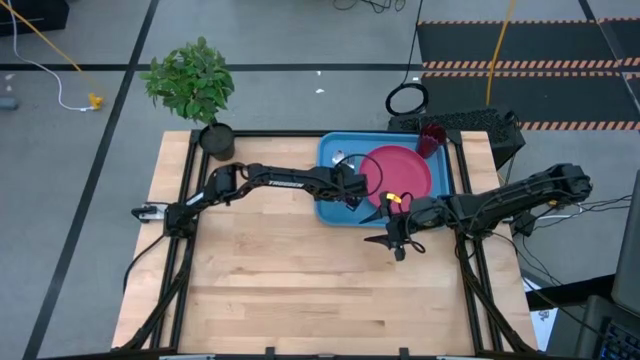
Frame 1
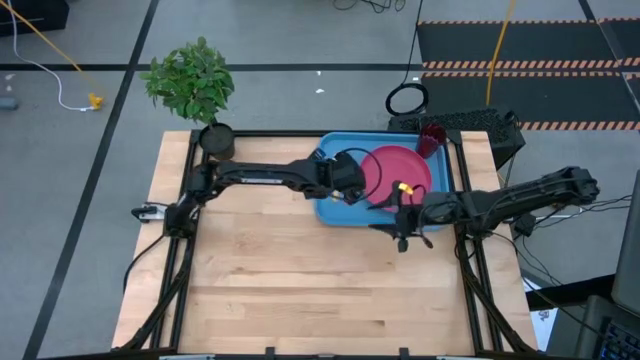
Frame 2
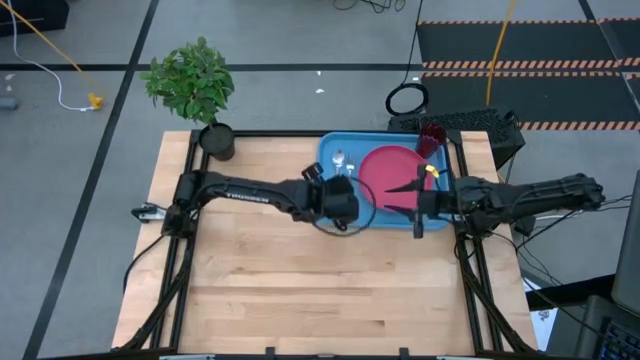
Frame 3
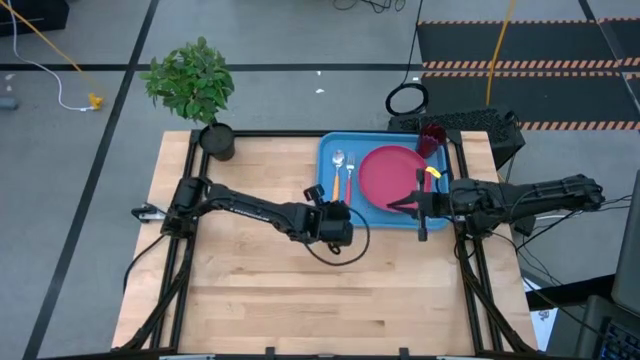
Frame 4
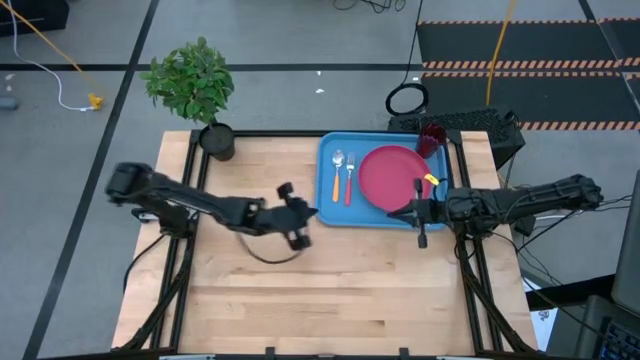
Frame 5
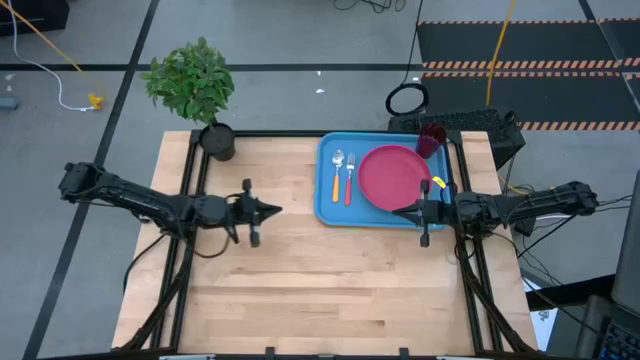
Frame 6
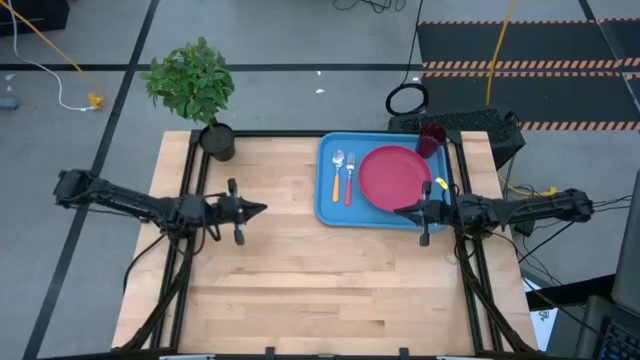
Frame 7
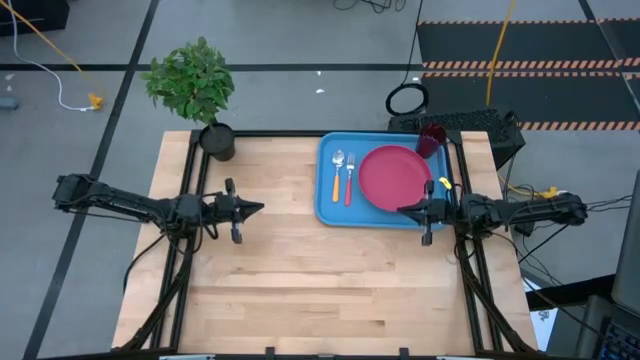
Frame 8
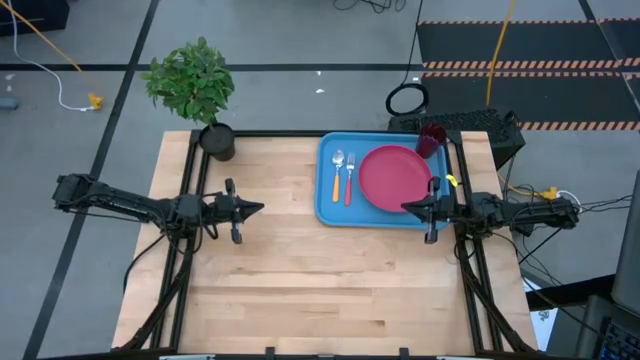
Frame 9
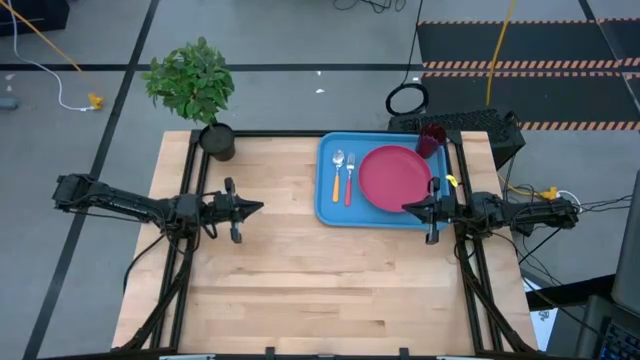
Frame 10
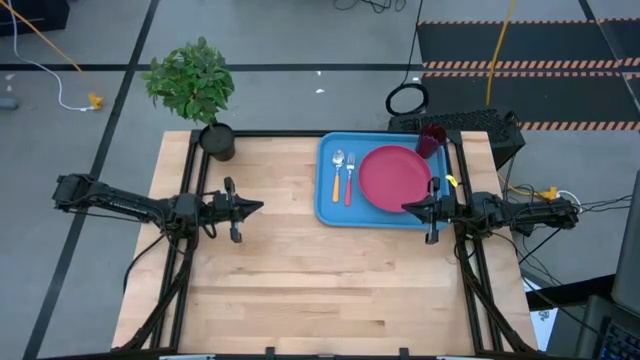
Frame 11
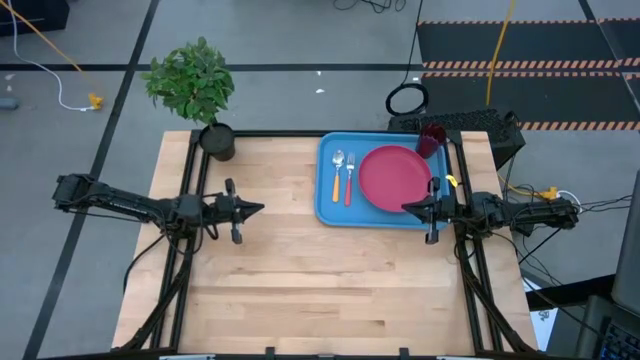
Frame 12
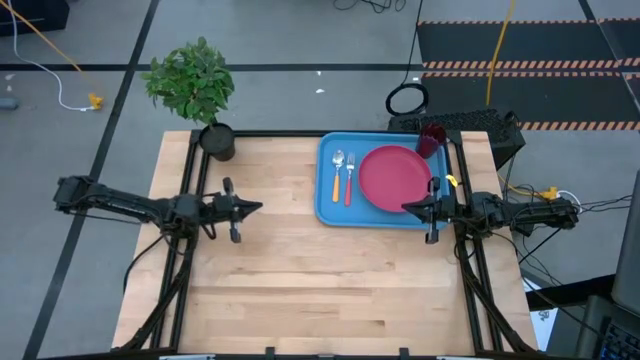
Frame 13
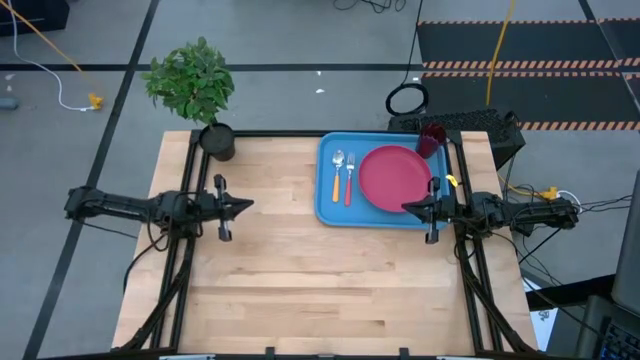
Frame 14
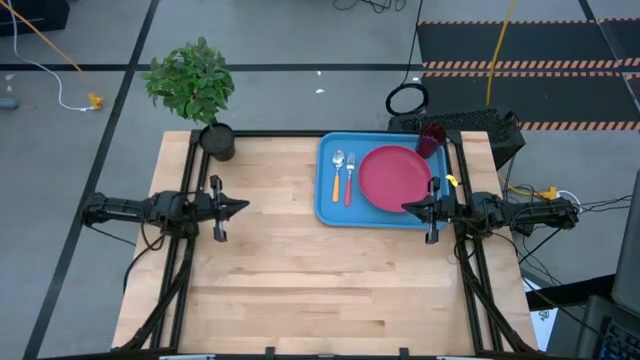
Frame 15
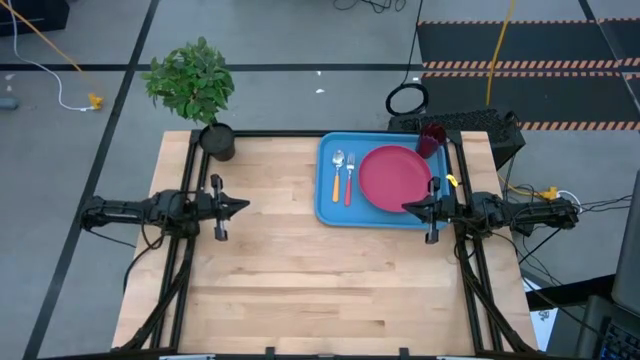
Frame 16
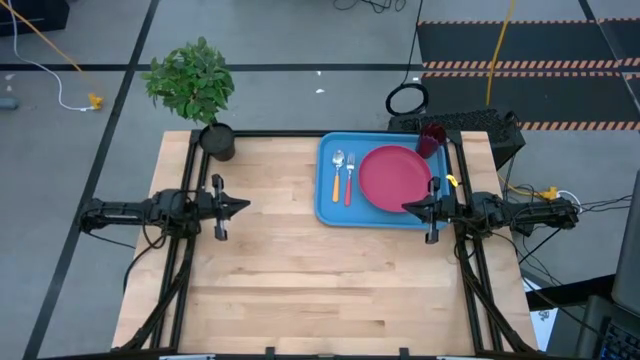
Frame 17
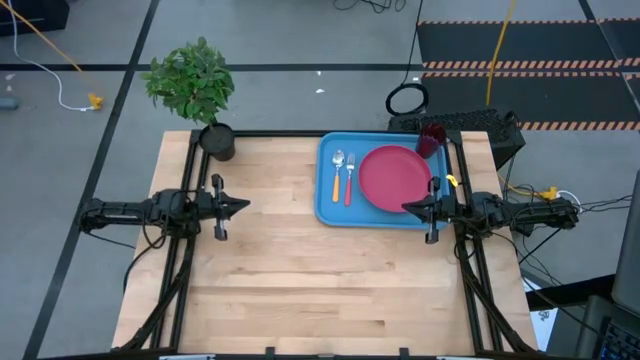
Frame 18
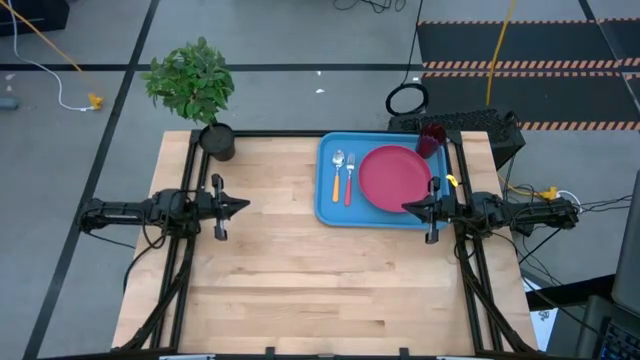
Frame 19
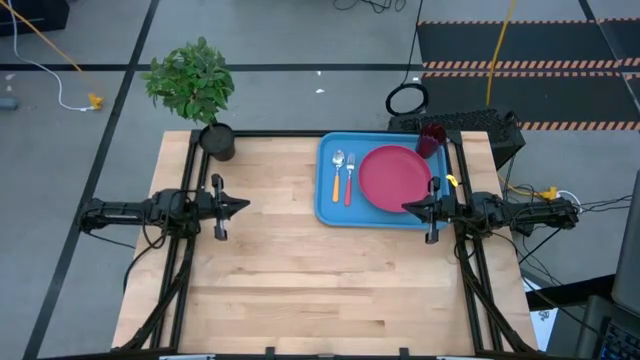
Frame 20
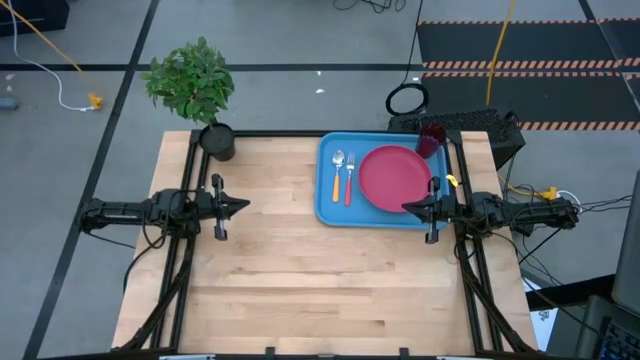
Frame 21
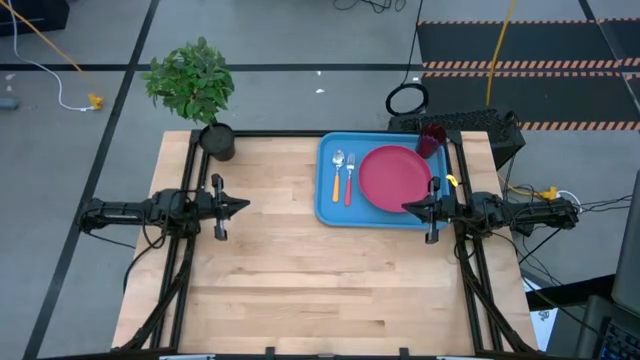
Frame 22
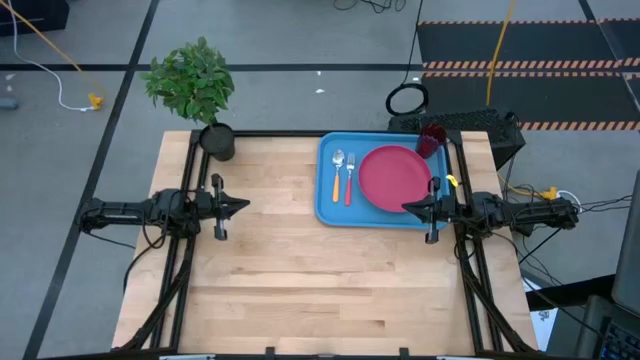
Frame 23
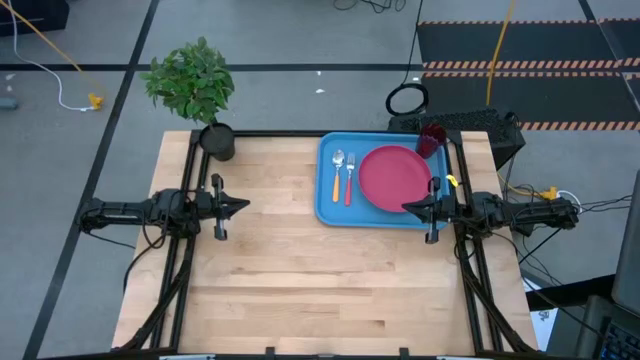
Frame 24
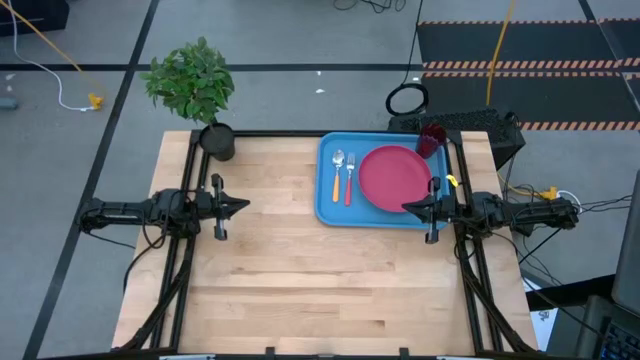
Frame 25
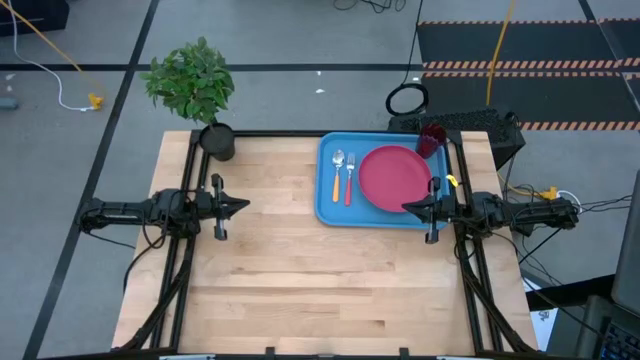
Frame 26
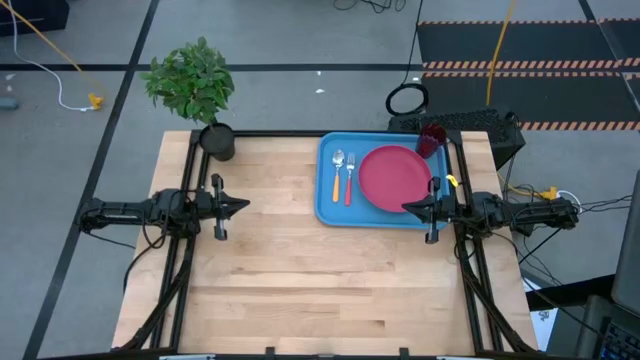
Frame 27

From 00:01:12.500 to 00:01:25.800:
Task: Pick and place plate/cup/fork/spoon on tray
Return to Home Position

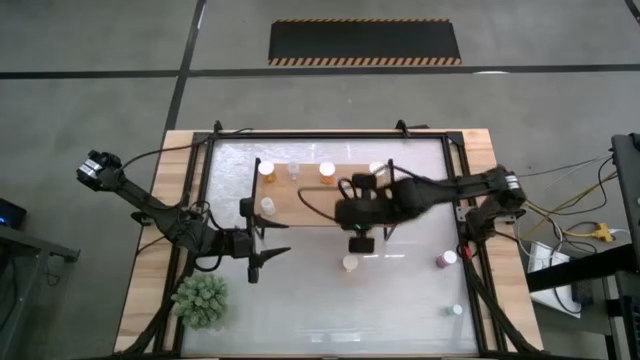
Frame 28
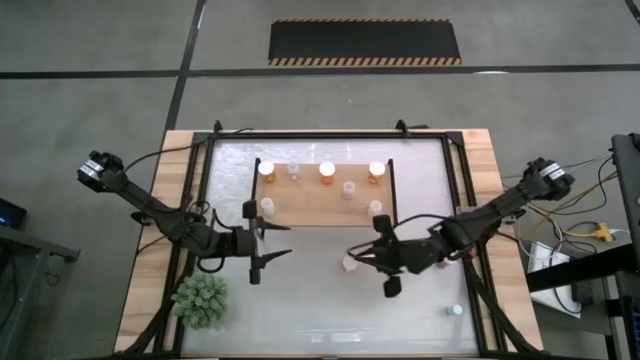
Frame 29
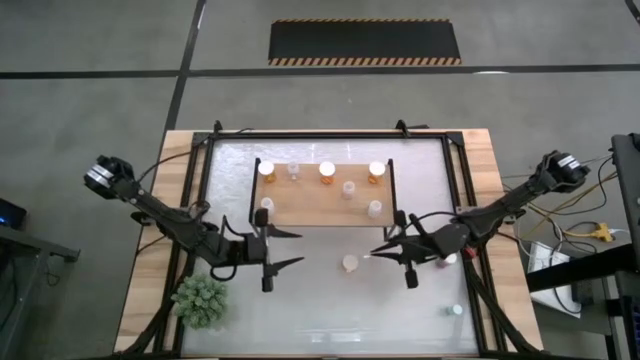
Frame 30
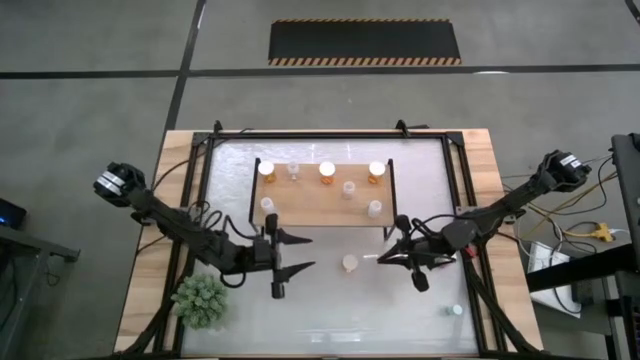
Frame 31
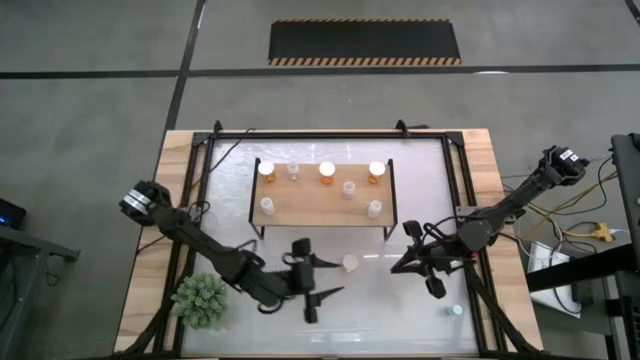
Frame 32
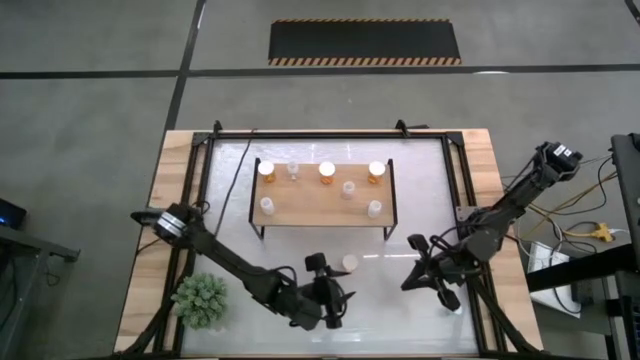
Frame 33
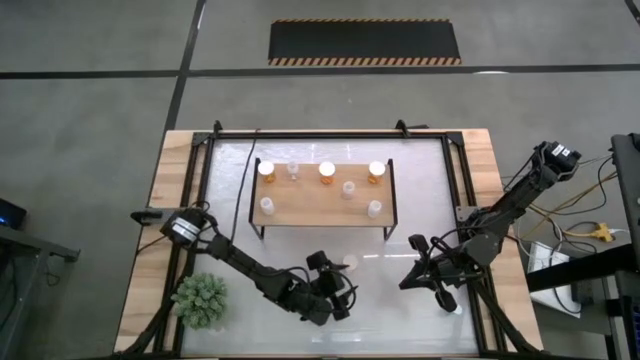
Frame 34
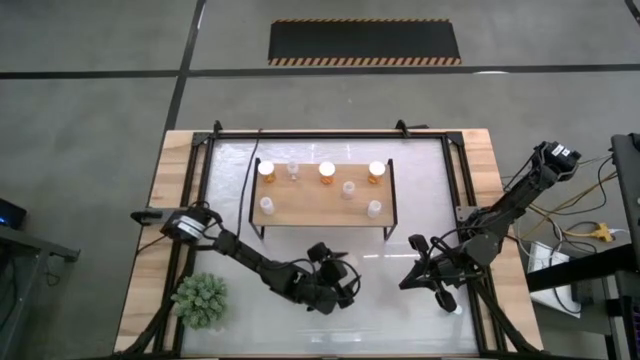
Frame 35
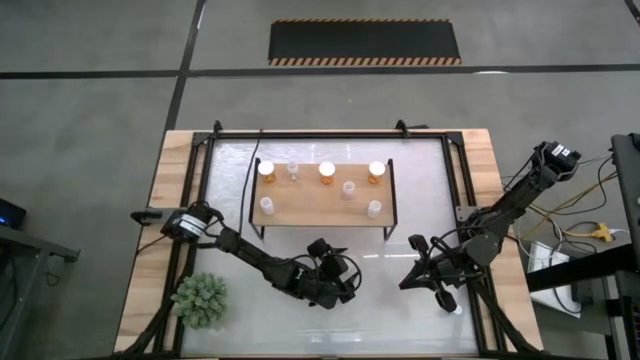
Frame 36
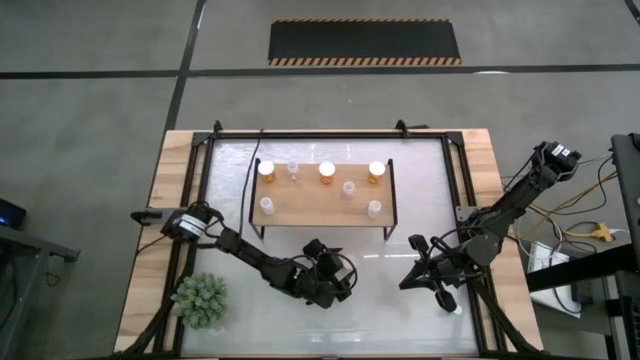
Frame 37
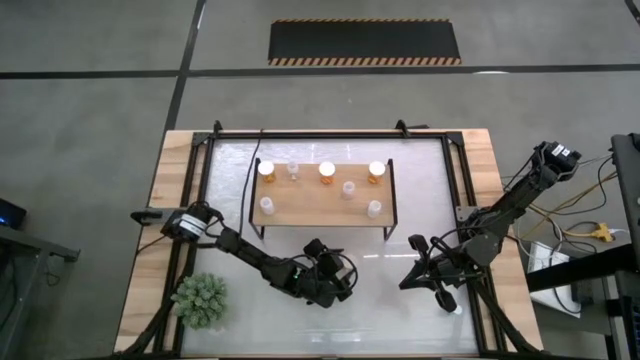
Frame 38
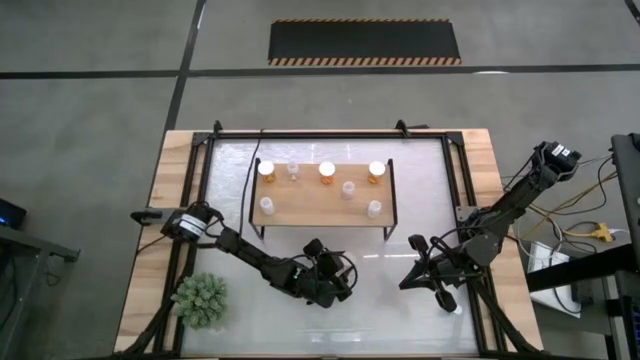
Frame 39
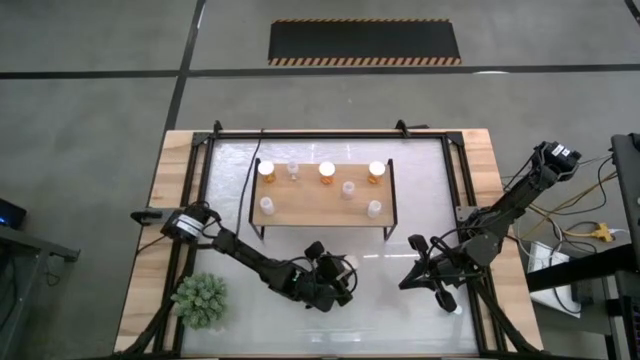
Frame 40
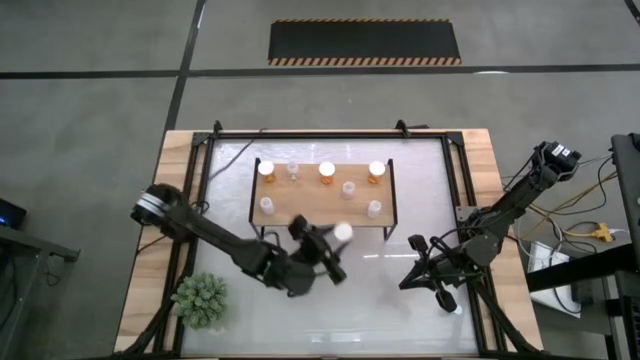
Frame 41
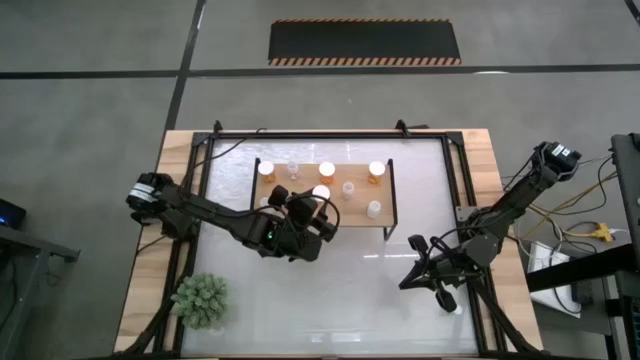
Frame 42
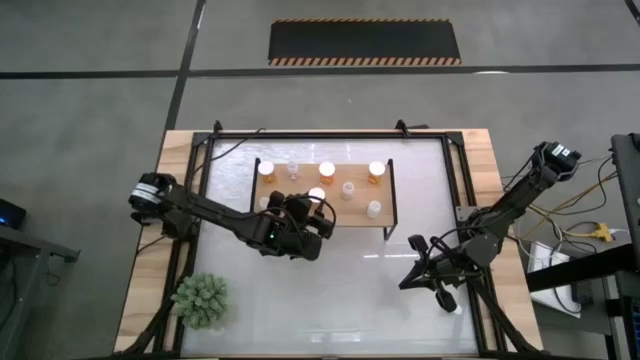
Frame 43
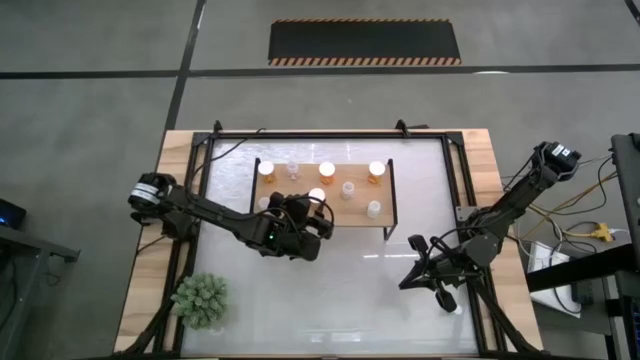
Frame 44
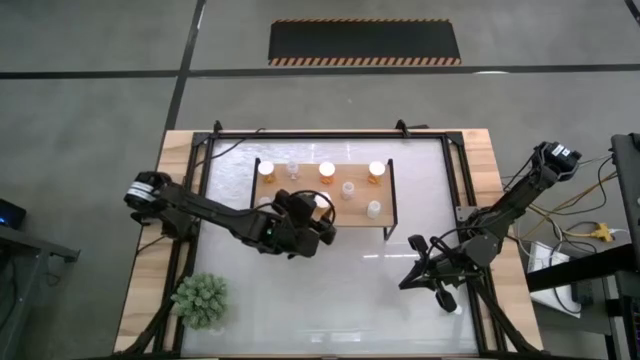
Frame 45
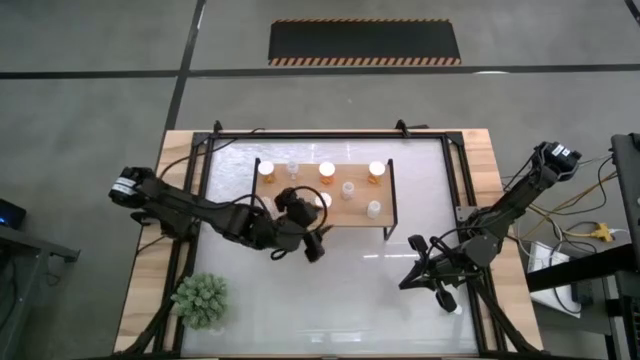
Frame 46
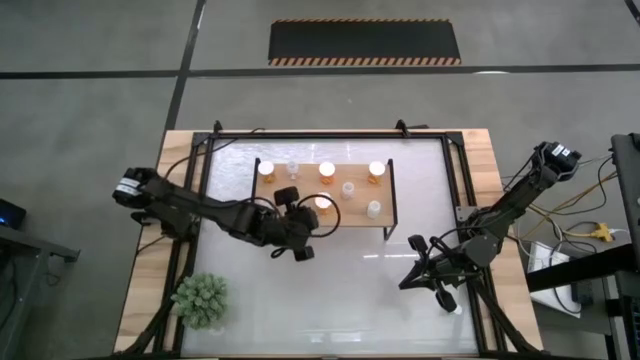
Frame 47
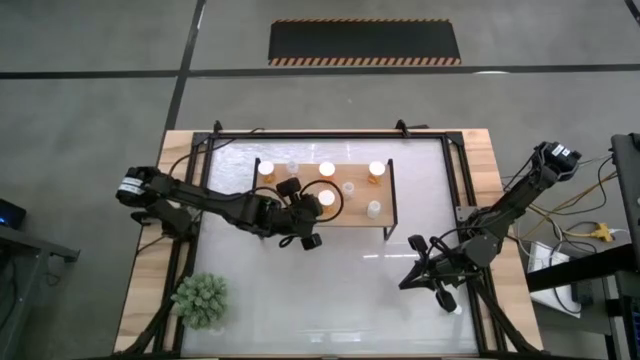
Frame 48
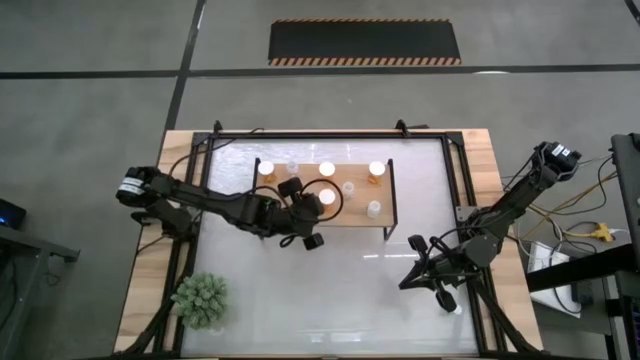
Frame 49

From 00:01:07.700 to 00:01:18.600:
Task: Pick and place medicine bottles onto shelf by color
Put the orange pill bottle on the shelf
